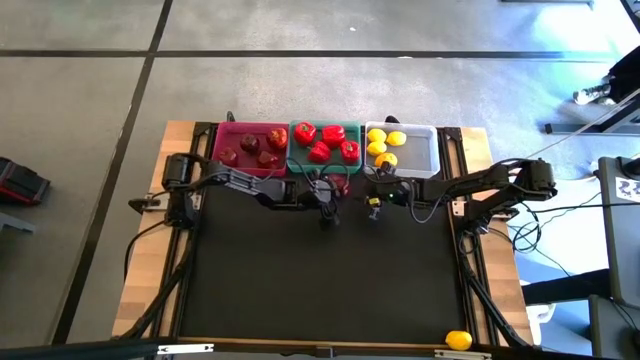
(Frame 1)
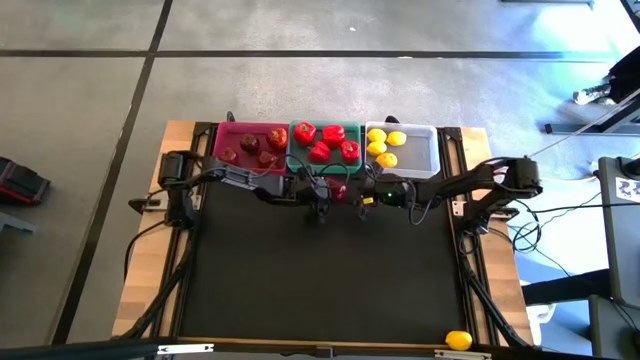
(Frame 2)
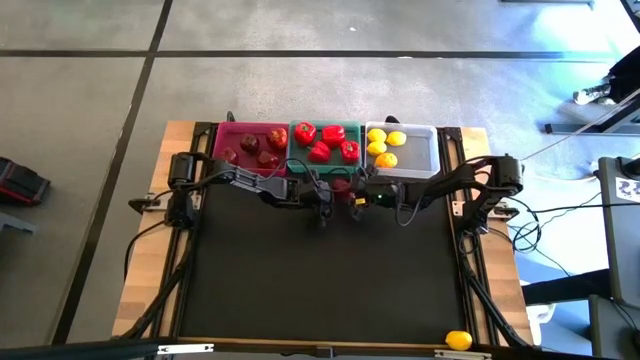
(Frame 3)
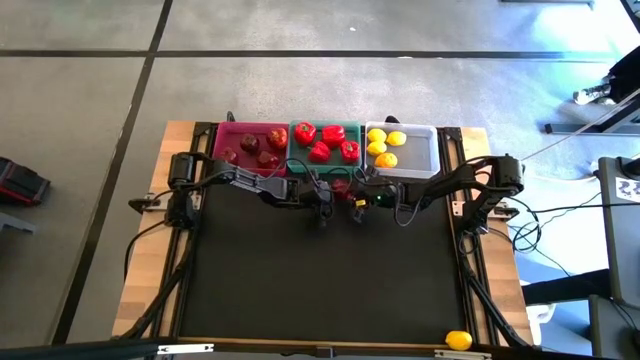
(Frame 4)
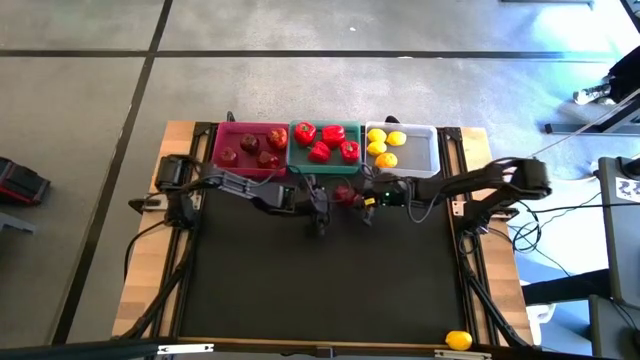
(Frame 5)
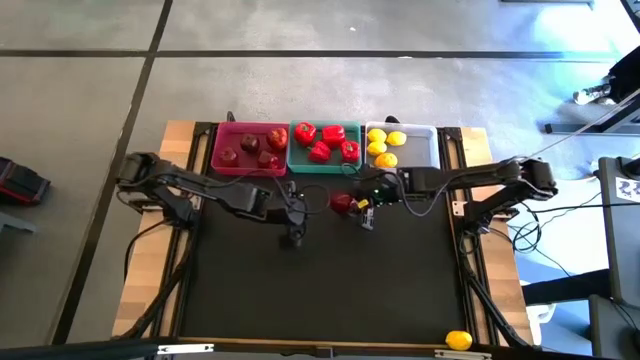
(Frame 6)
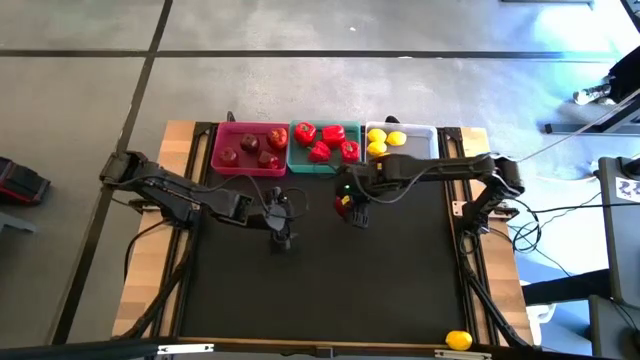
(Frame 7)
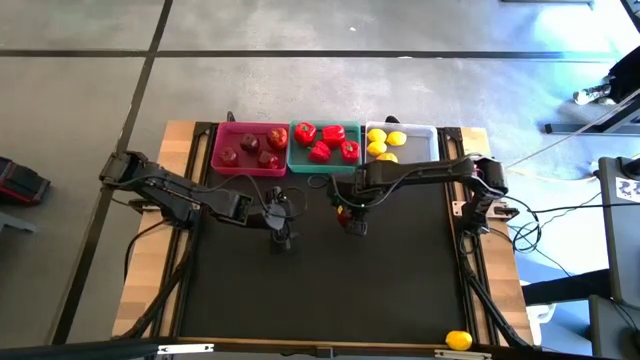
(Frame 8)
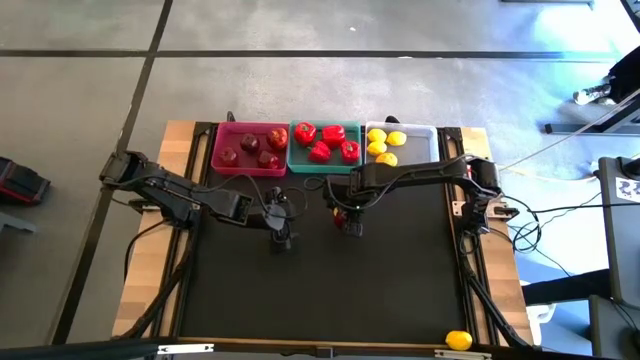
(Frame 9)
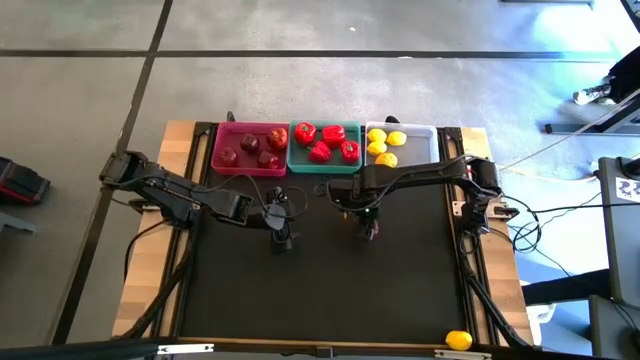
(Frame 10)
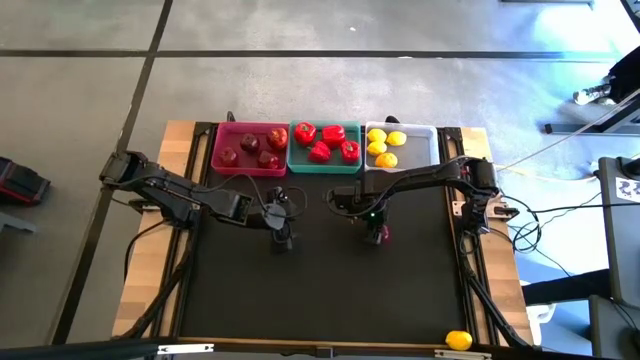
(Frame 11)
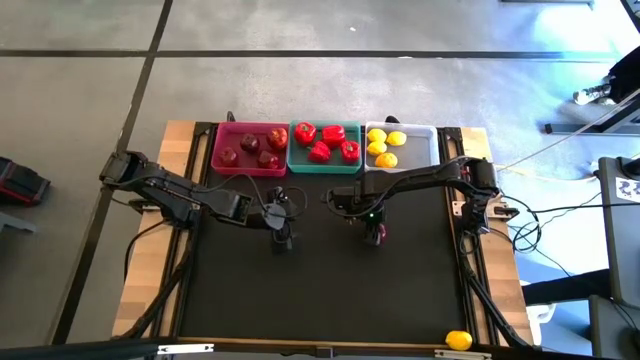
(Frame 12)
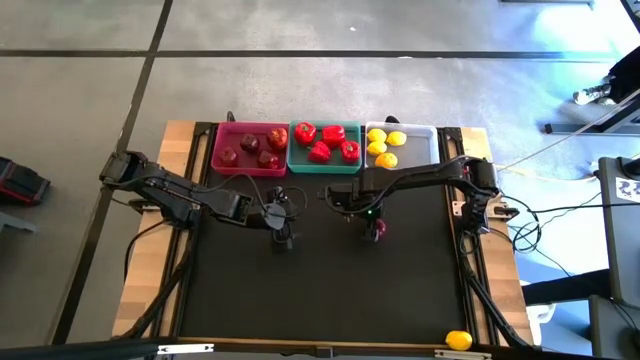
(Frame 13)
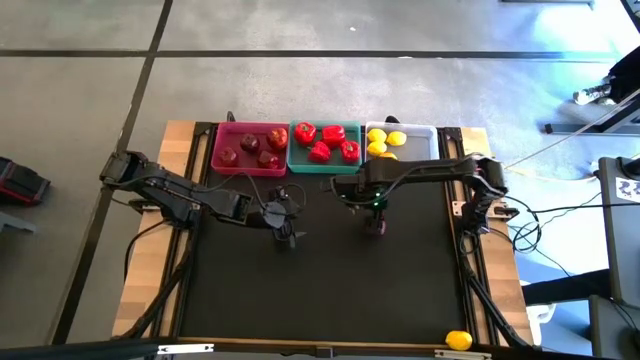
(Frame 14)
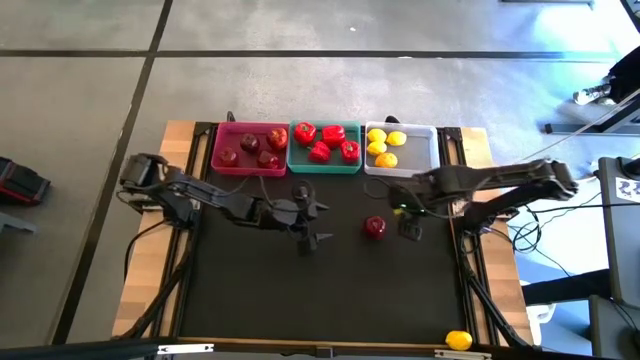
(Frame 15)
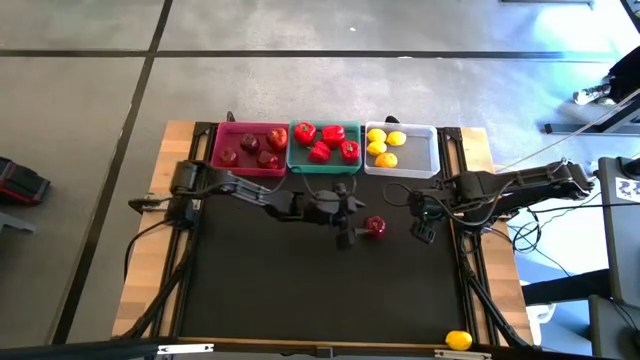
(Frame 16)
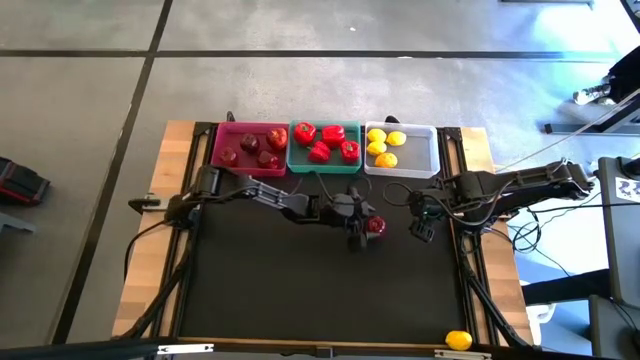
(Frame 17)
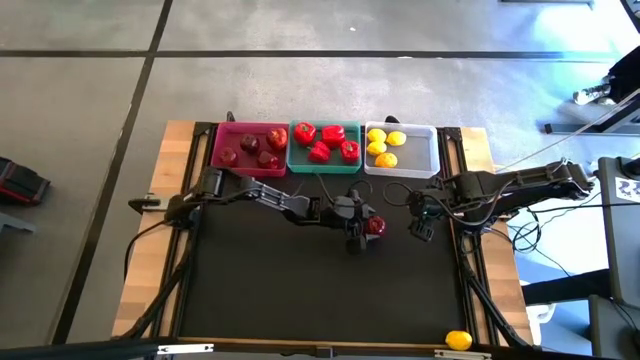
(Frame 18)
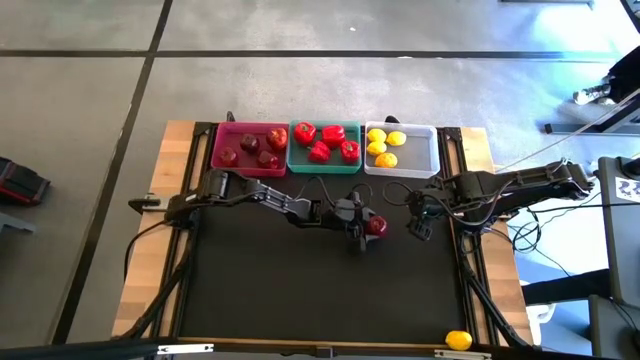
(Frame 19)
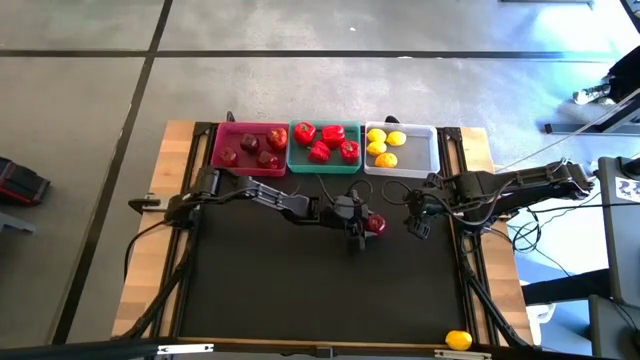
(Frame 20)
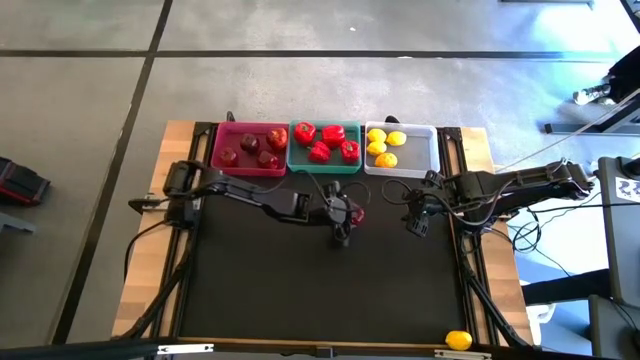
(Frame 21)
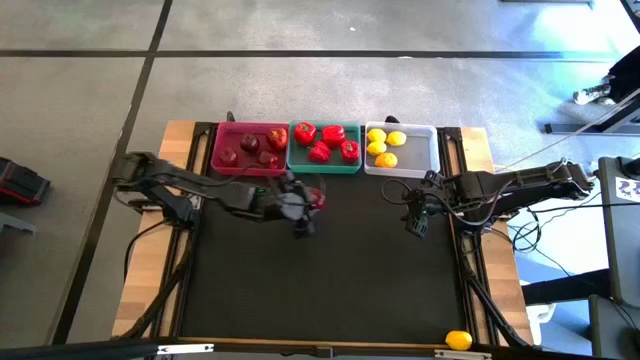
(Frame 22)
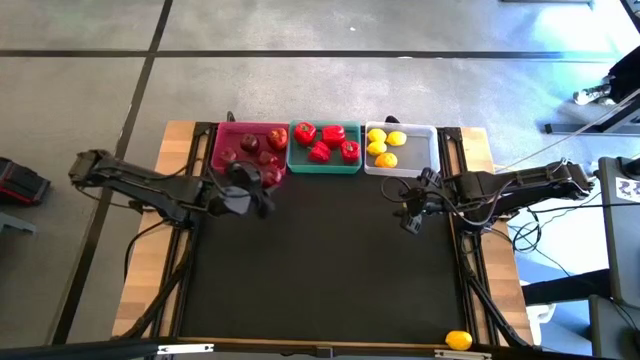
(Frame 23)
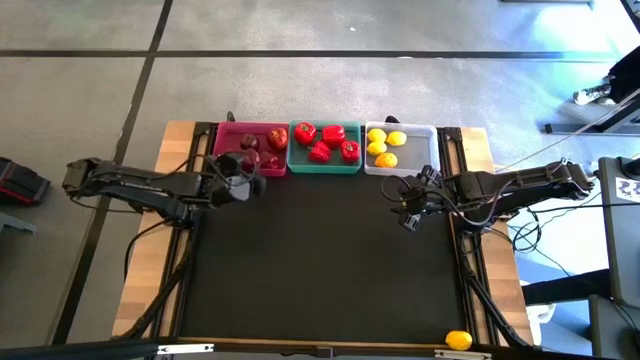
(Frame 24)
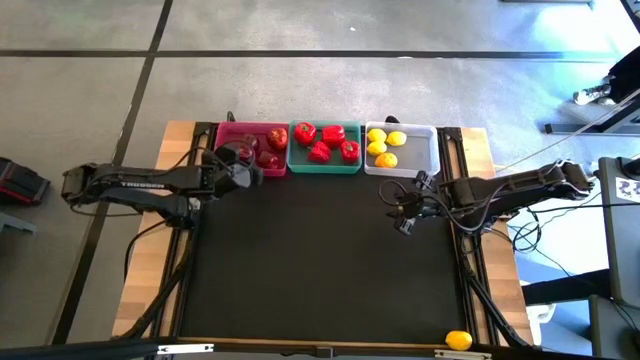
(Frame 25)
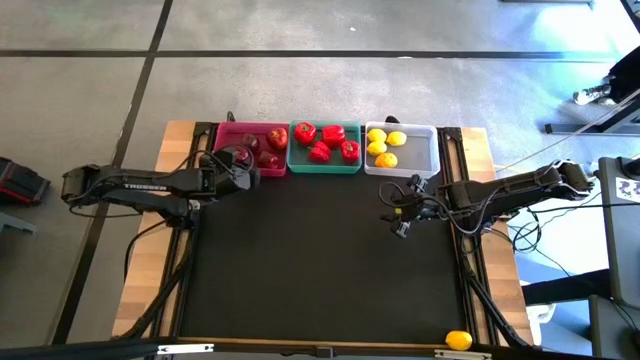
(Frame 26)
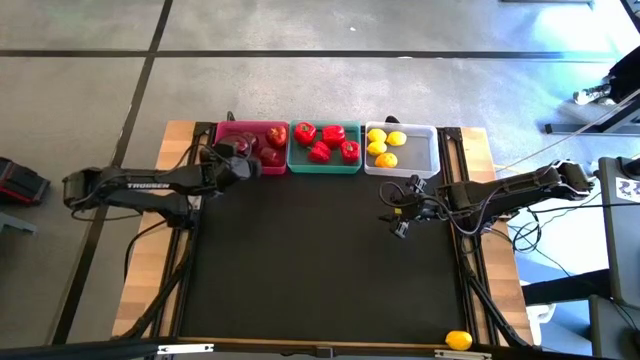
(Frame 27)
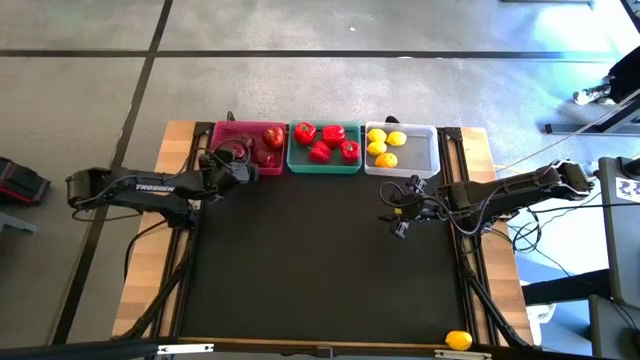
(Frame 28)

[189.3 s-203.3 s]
Task: Sort produce into baskets
Put the apple into the pink bin

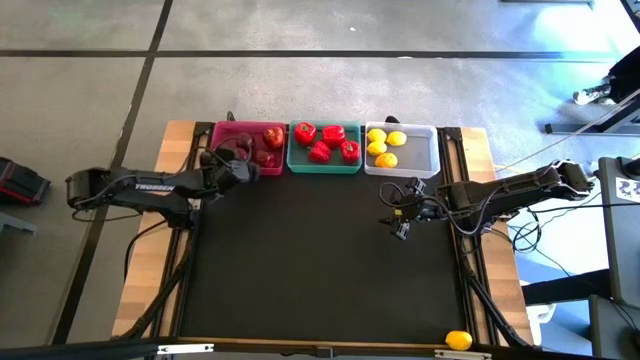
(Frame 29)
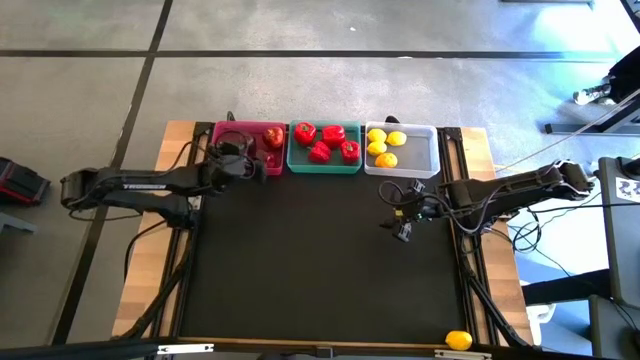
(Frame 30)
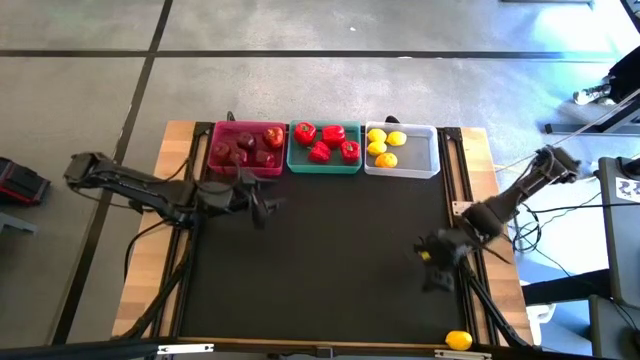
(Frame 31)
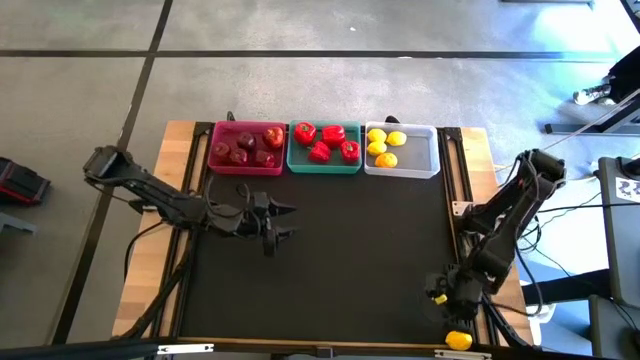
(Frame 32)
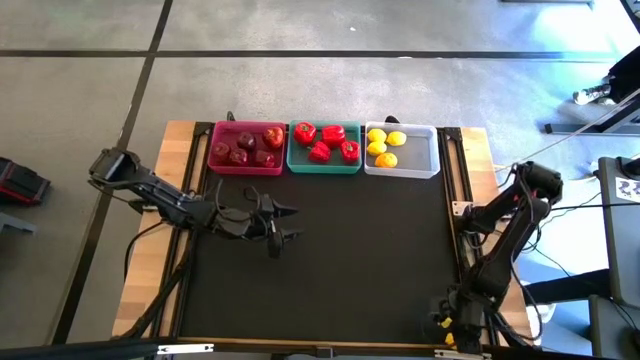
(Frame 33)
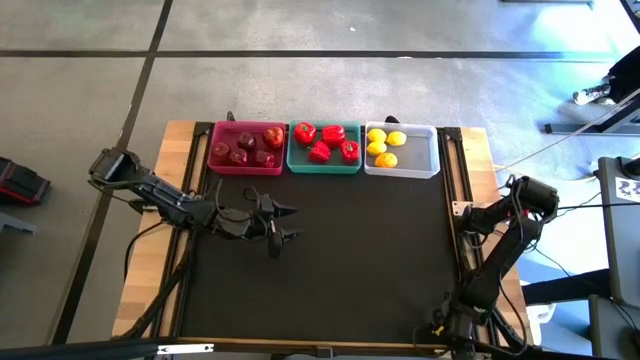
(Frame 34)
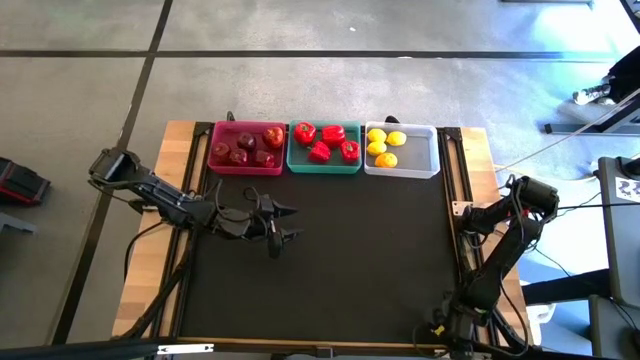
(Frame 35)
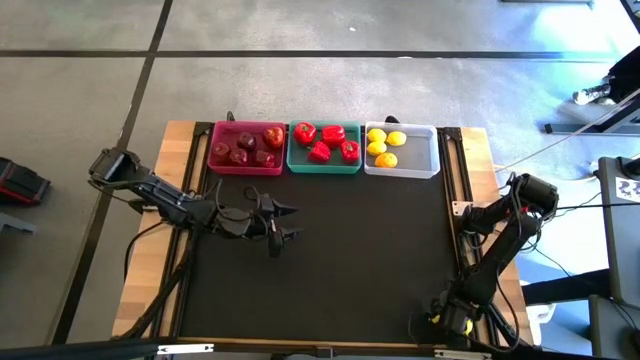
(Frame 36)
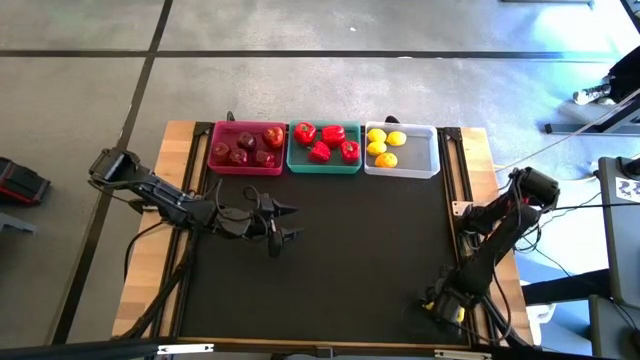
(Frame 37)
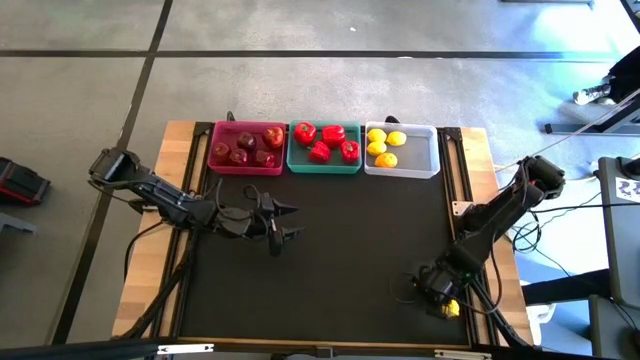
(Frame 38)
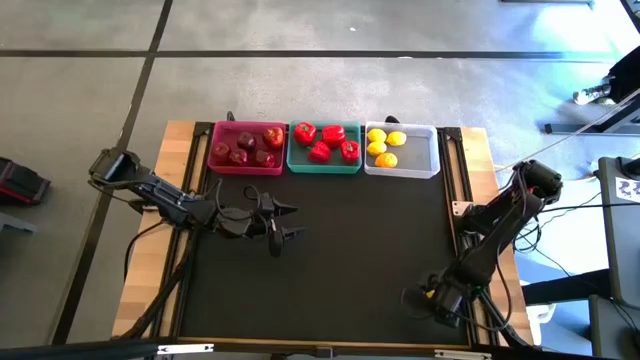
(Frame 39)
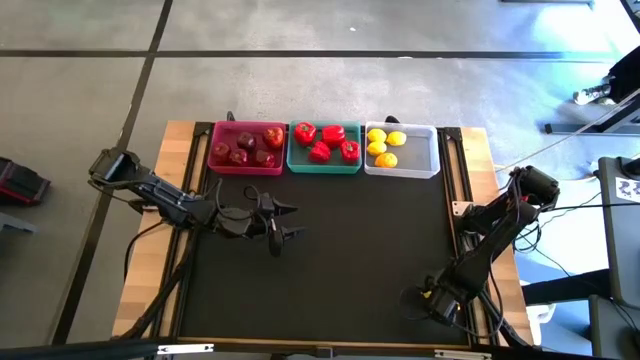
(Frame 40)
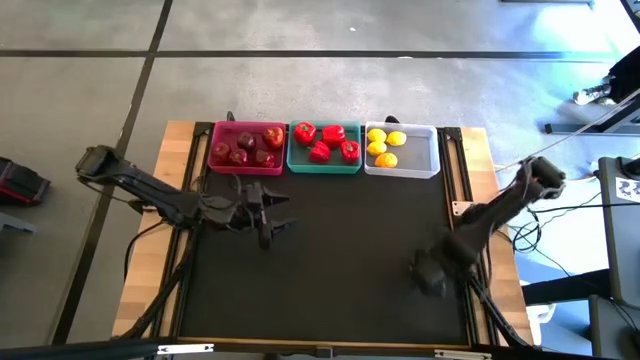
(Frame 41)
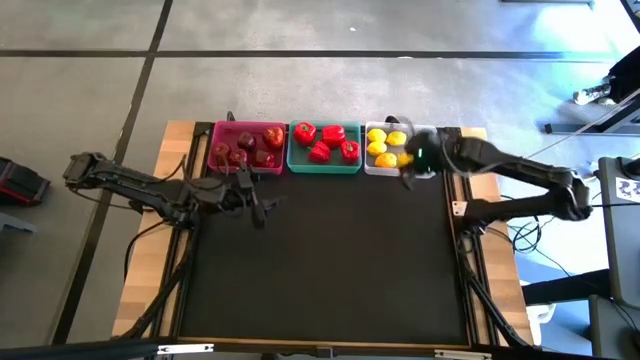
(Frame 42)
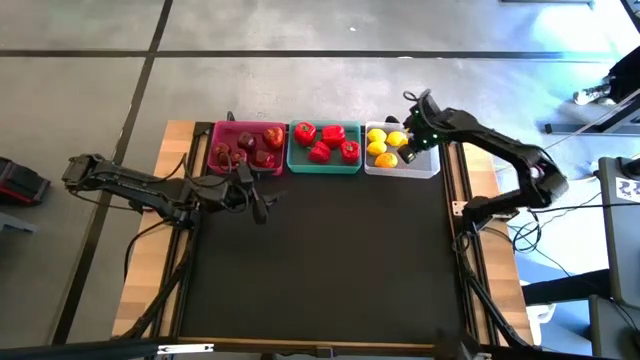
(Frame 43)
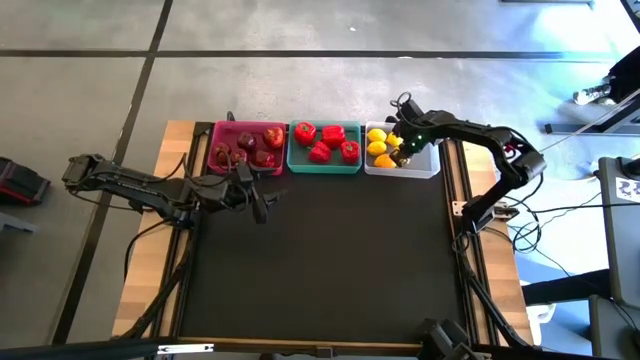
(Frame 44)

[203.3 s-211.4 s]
Put the lemon into the white bin
